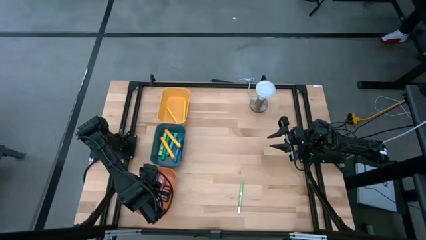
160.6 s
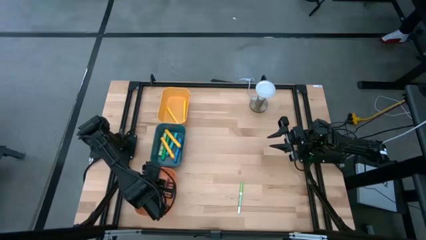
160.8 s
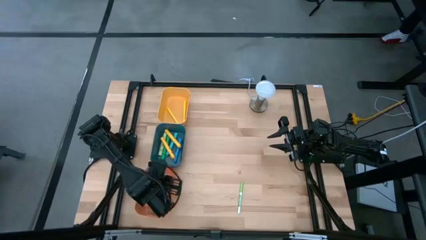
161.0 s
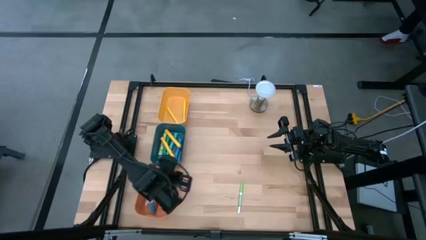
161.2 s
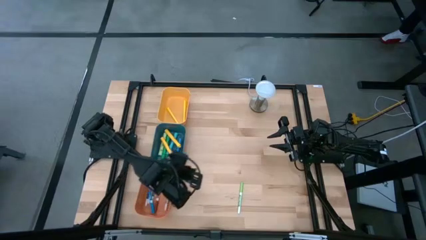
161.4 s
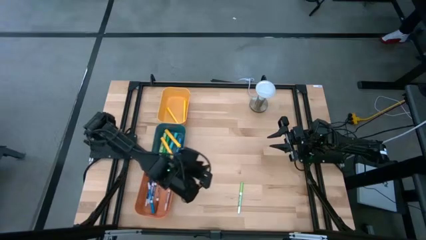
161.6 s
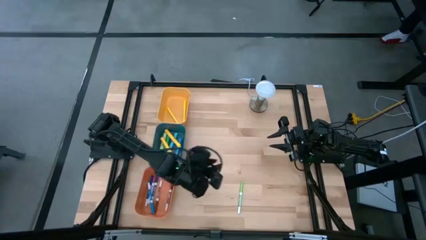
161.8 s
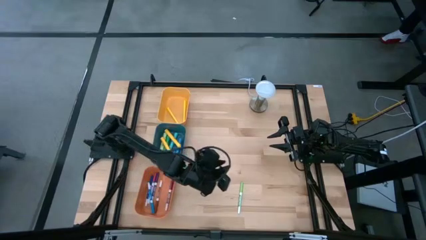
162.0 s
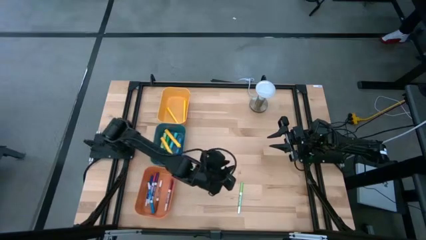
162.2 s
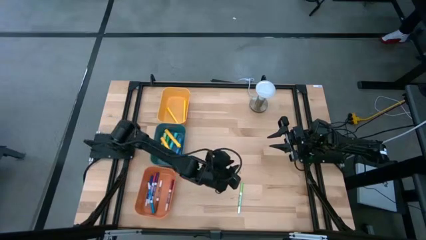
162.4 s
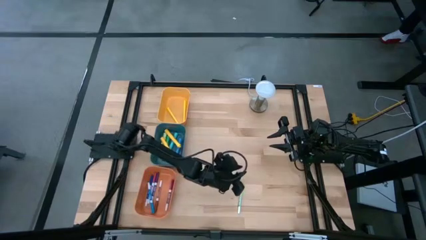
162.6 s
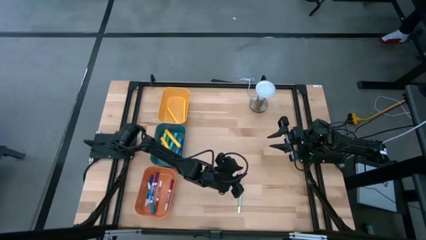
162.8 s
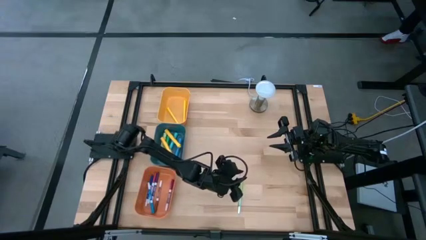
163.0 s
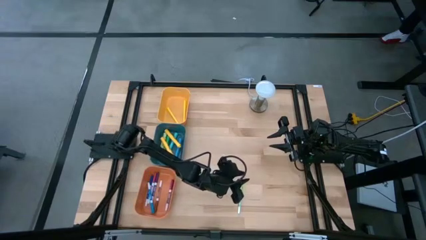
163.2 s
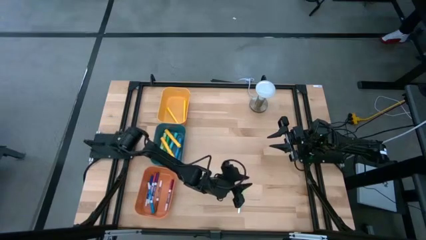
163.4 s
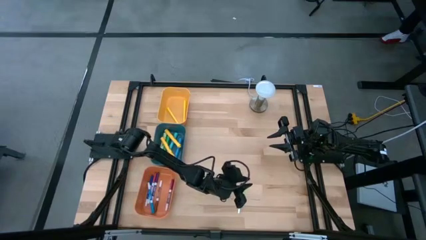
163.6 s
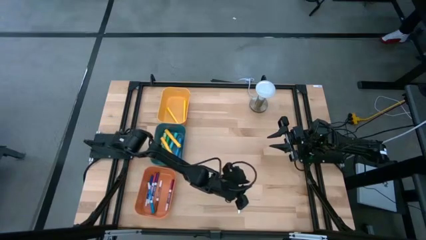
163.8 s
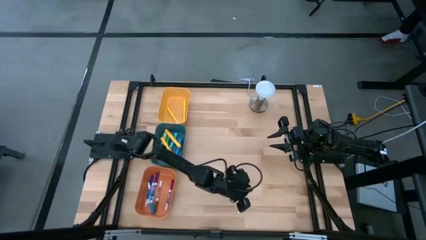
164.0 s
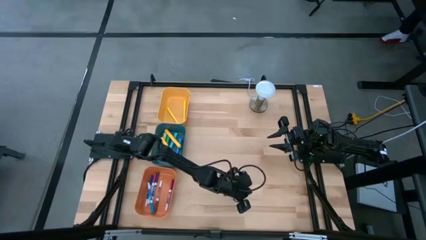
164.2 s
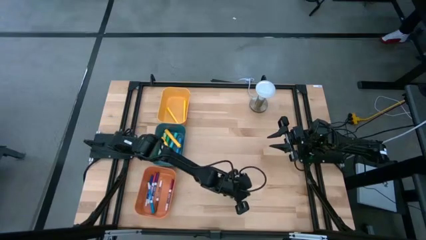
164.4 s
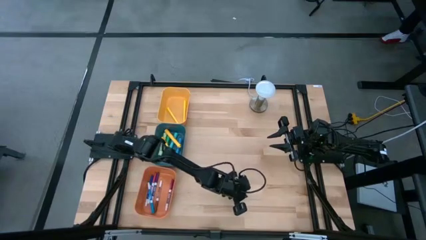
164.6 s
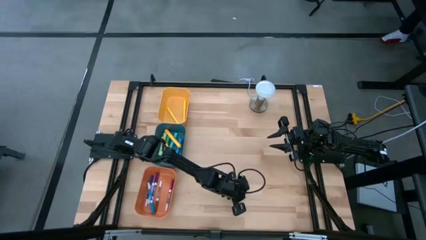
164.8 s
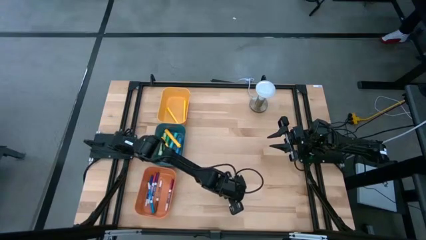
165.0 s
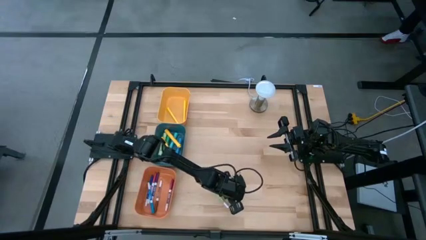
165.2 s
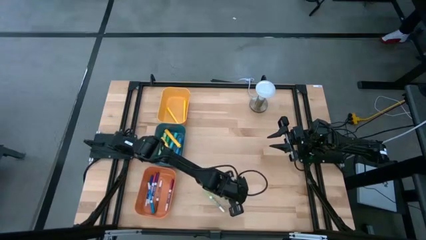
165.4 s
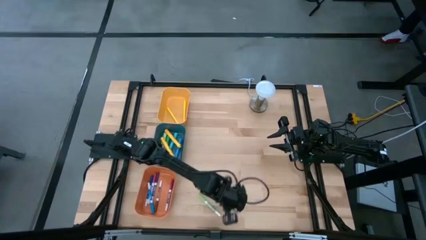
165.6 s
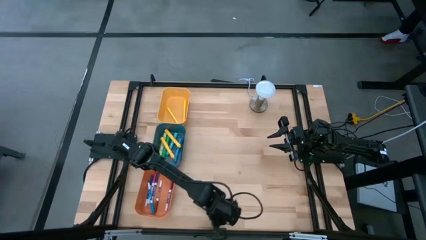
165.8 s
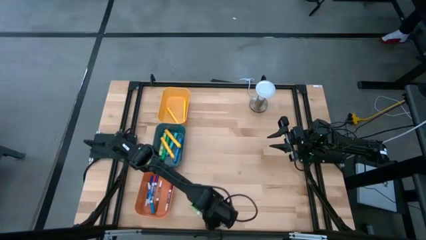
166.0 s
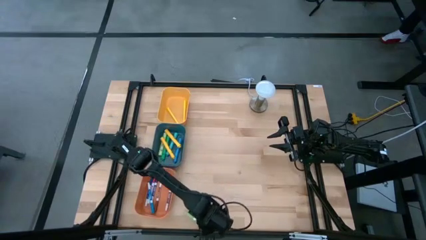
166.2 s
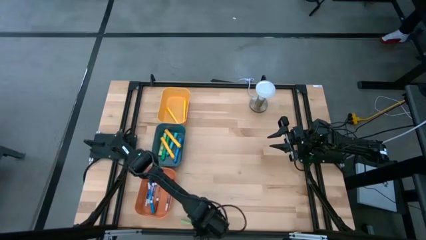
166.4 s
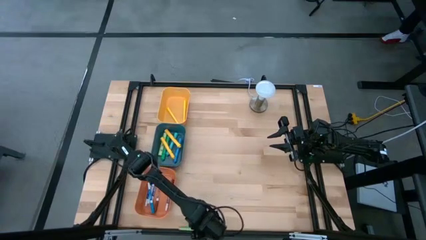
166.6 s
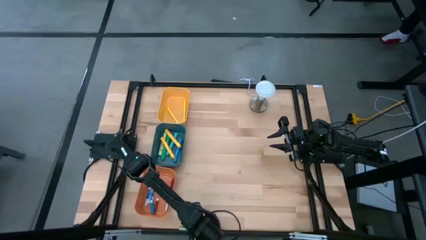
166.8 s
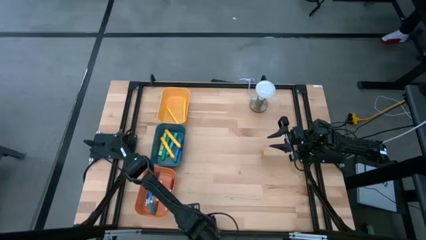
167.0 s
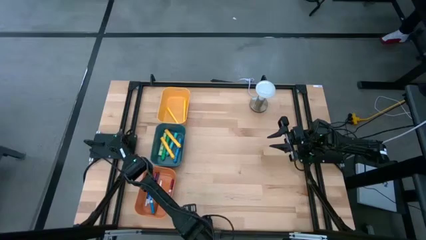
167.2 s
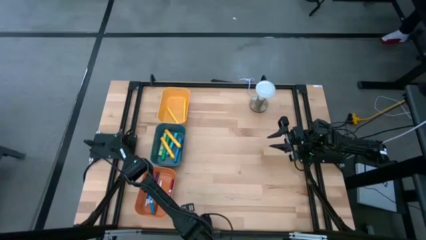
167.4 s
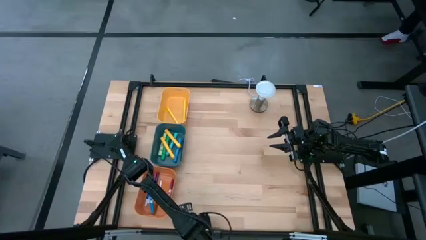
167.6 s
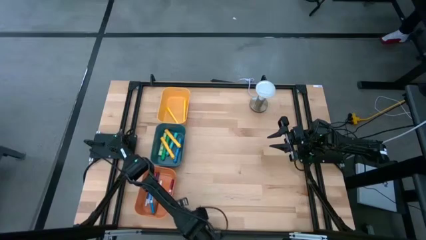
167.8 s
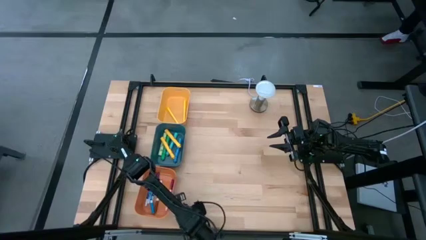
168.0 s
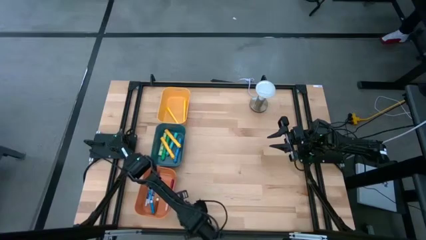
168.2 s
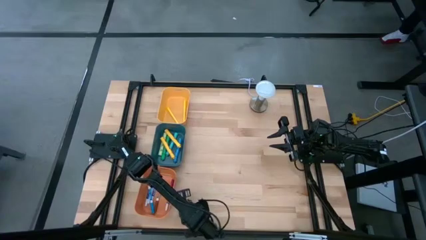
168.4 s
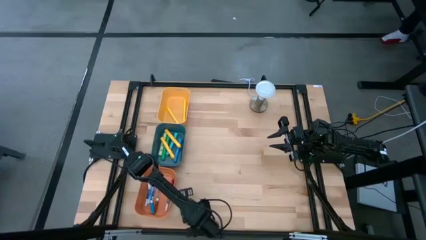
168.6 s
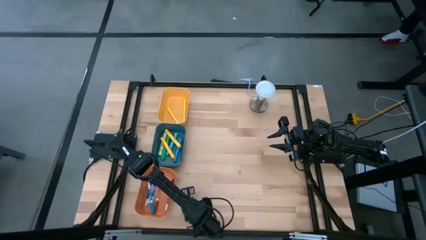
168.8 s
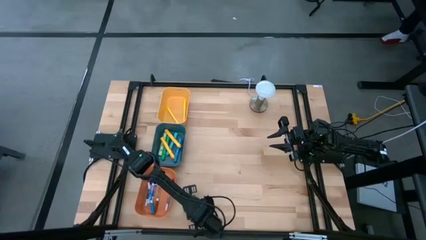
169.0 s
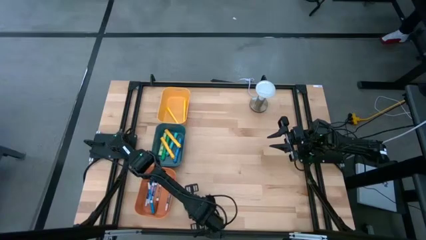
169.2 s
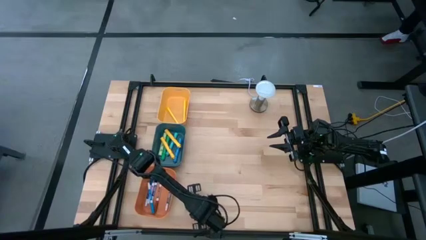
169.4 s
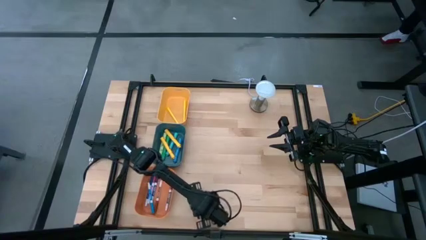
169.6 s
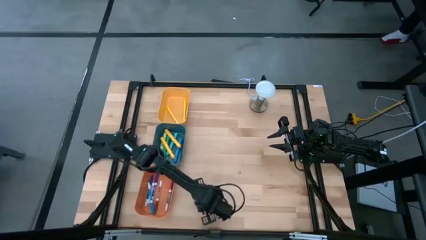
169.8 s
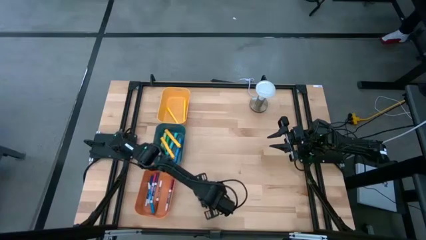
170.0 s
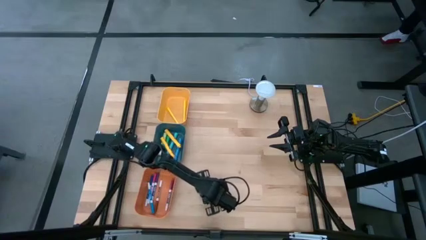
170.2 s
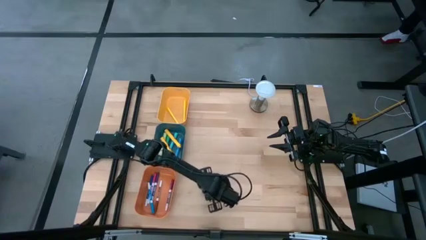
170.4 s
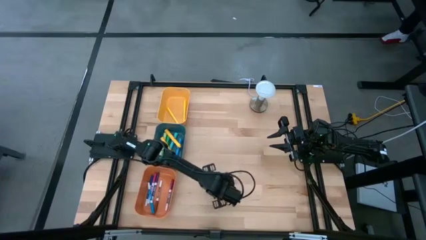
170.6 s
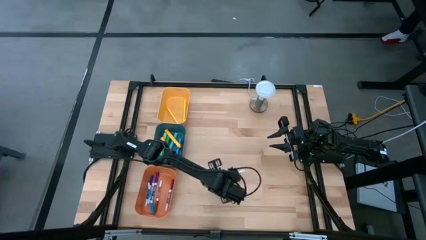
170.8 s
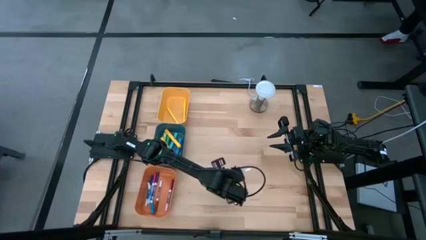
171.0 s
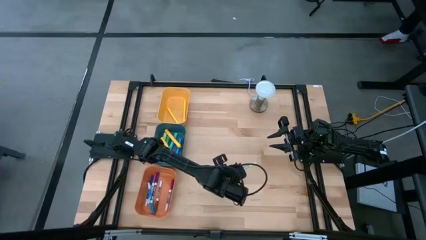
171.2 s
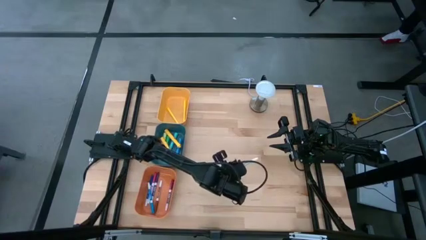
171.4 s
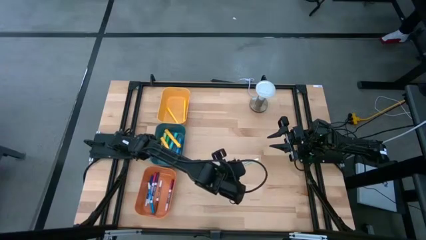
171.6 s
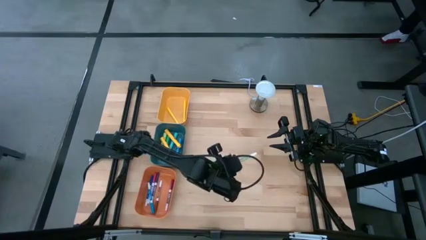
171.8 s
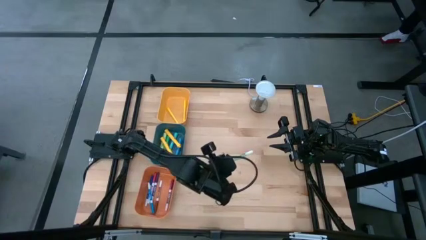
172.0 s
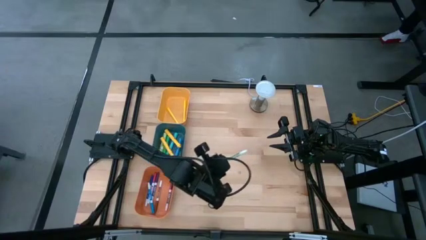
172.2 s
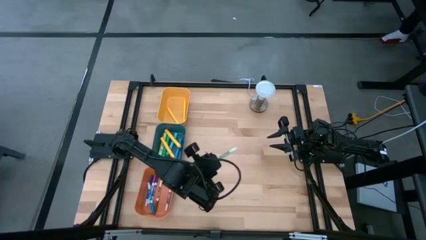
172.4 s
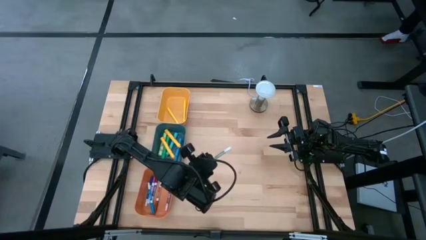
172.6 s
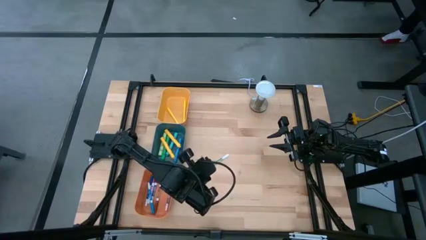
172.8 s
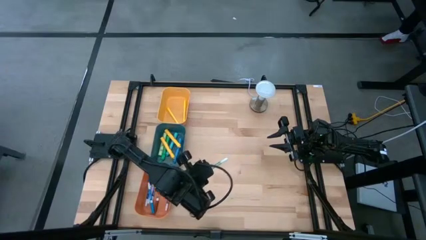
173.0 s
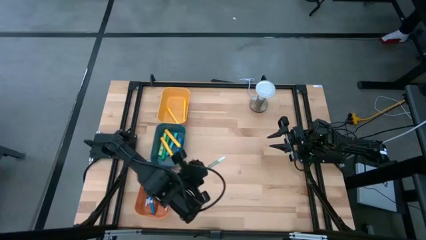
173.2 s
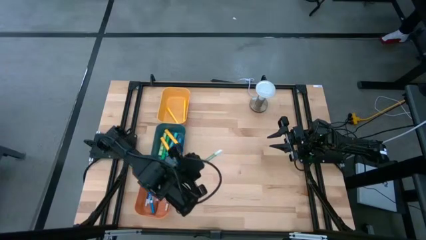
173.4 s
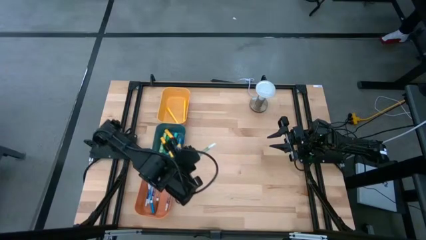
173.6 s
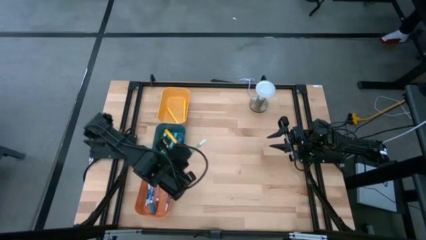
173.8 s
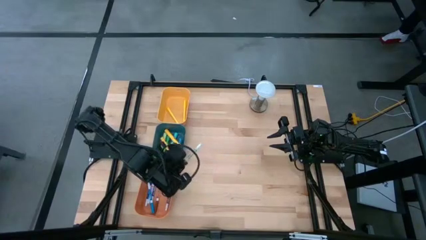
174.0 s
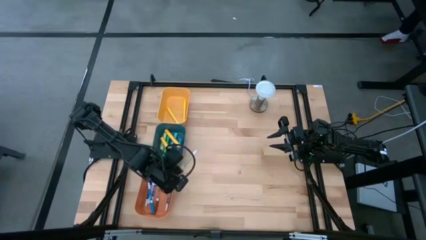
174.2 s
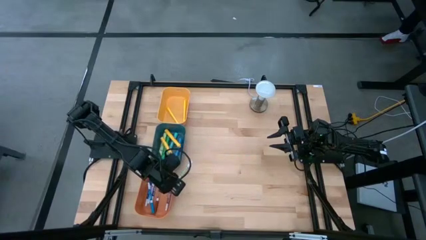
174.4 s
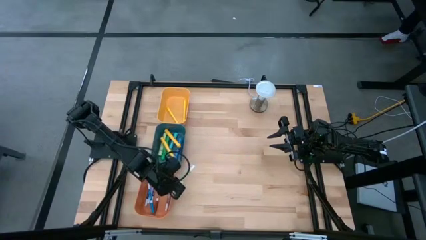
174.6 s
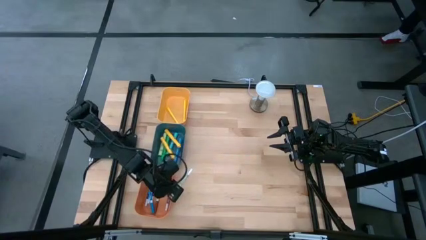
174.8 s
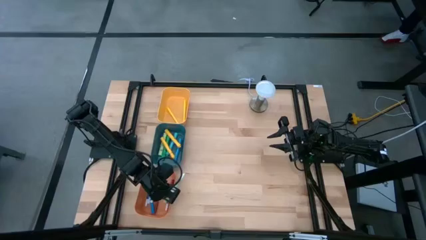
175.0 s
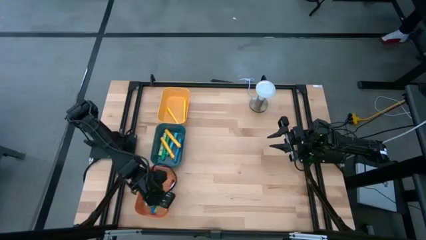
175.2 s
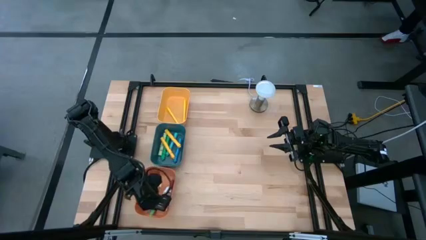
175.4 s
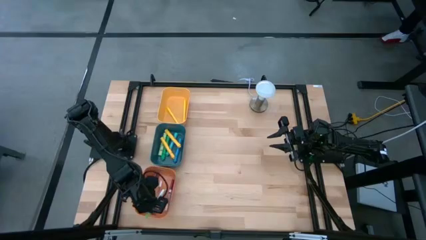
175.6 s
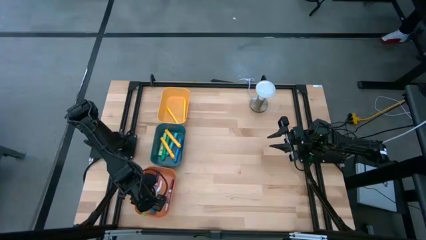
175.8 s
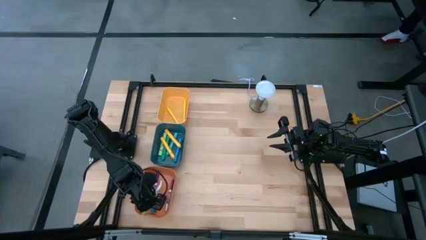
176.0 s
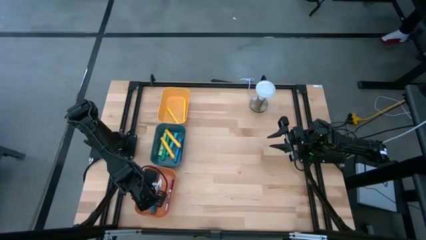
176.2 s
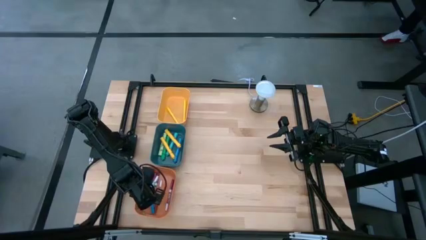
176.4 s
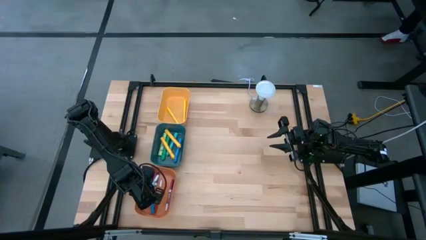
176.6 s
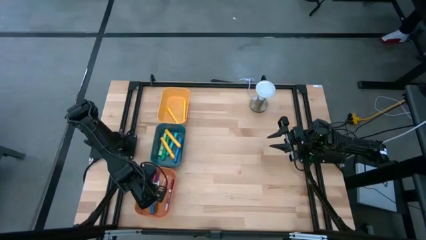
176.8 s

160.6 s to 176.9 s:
Task: Pick & Place Markers
Put the light green marker pen into the orange bin
